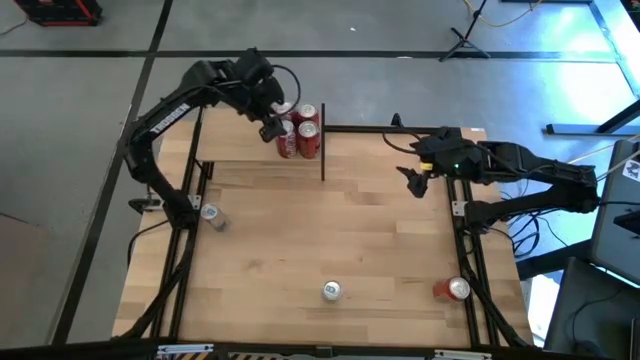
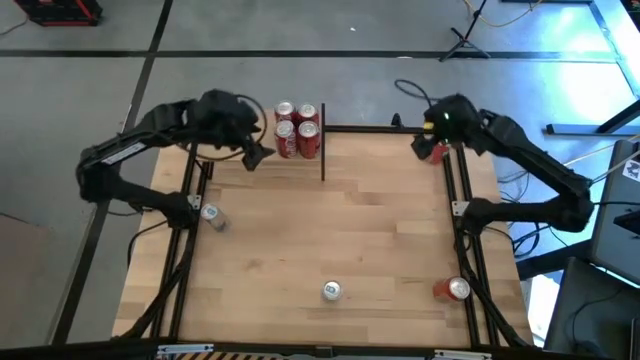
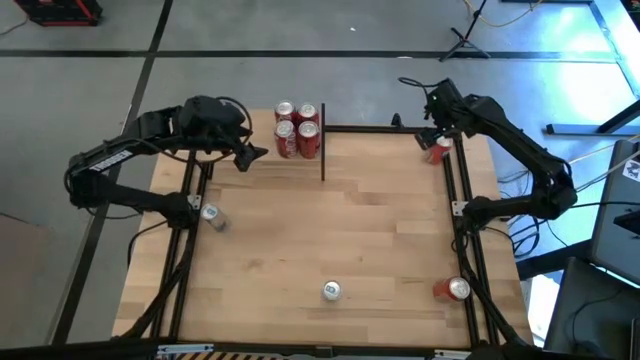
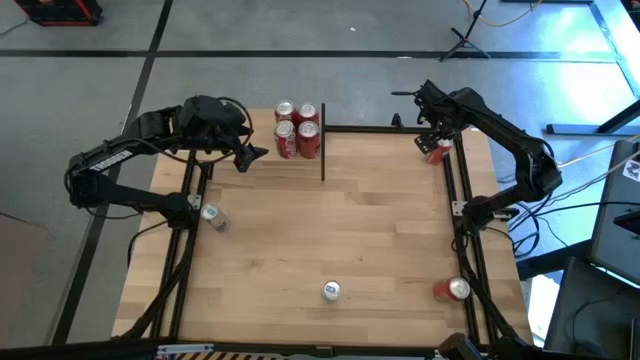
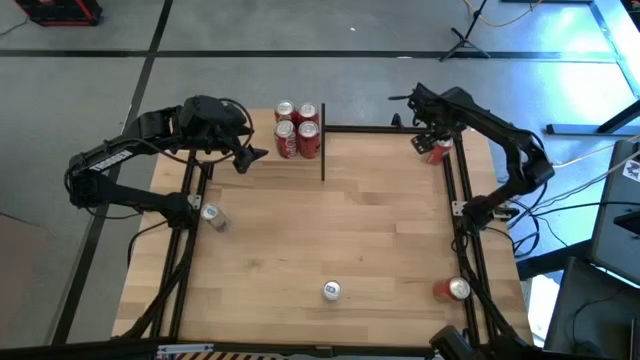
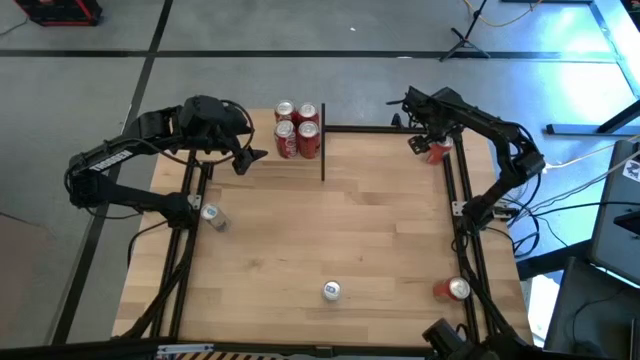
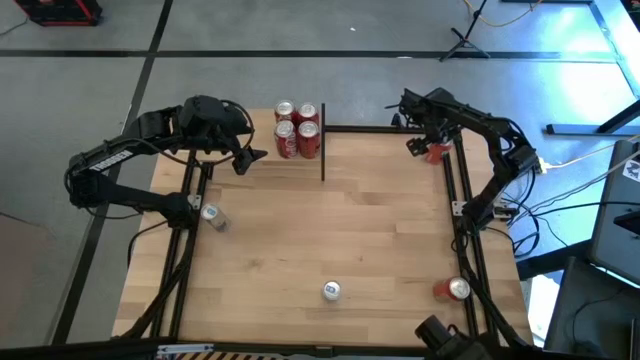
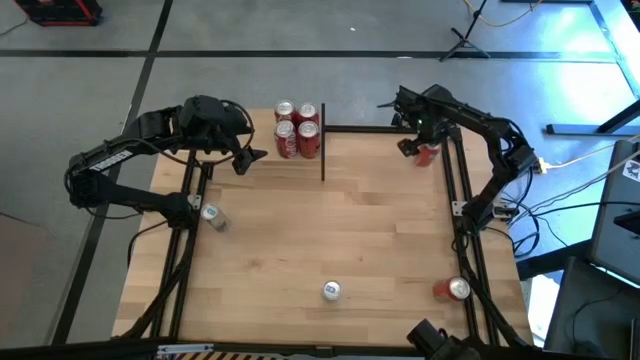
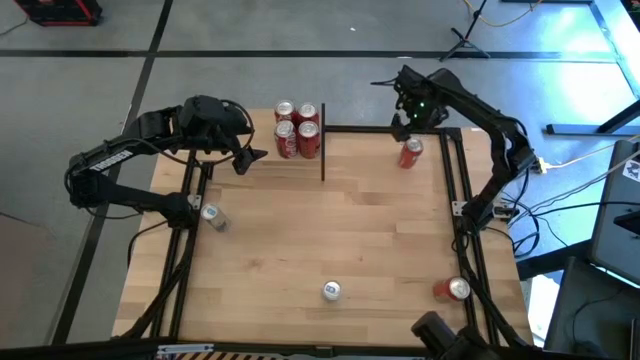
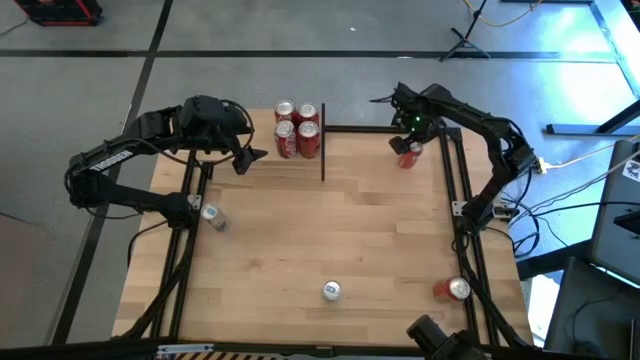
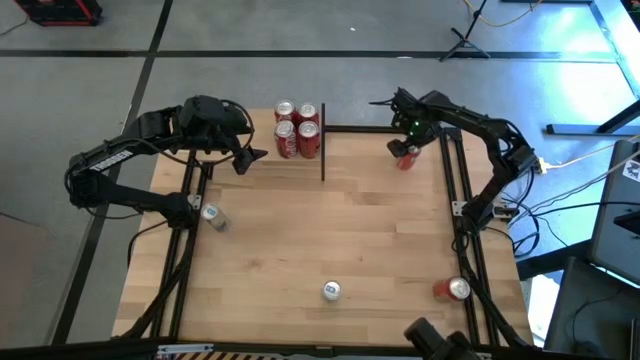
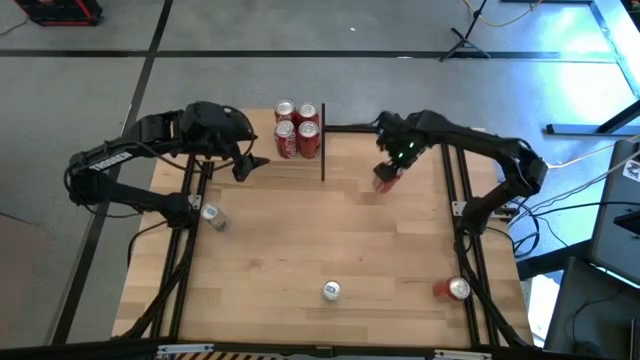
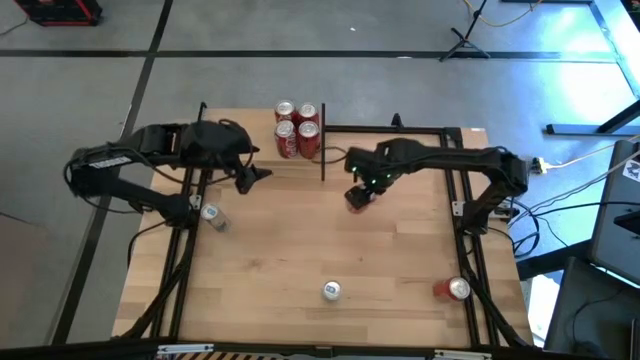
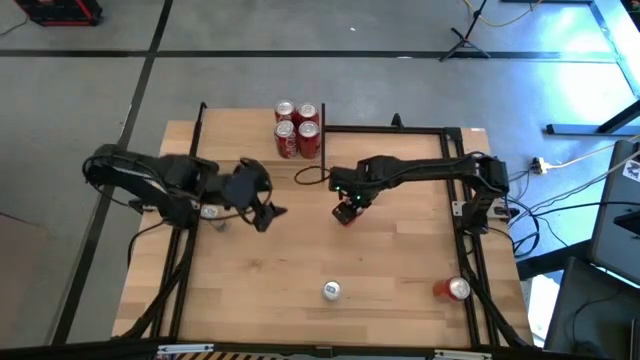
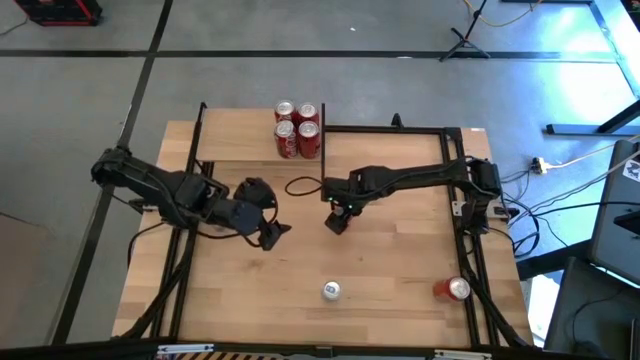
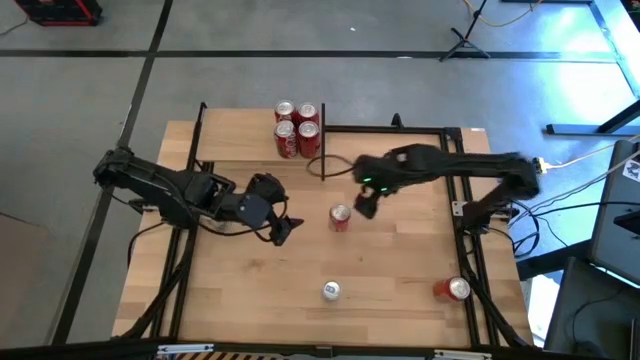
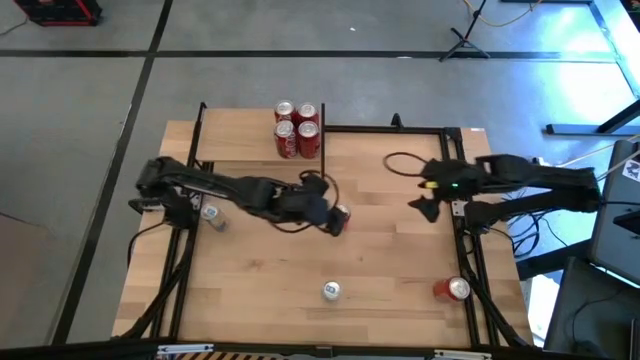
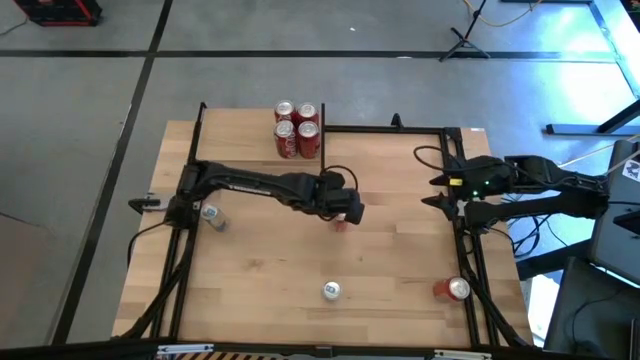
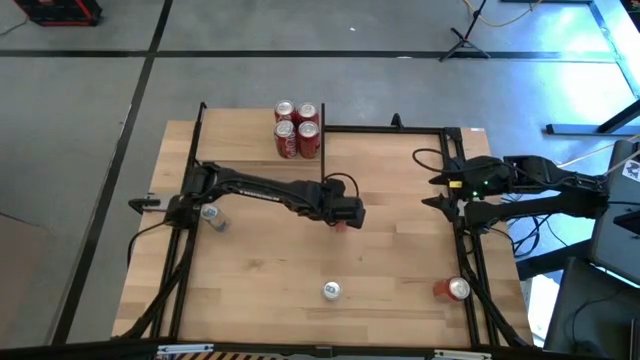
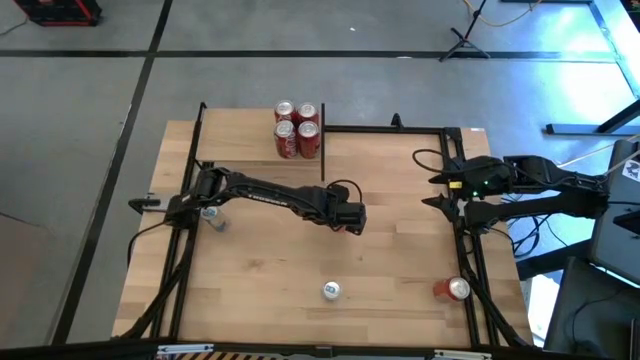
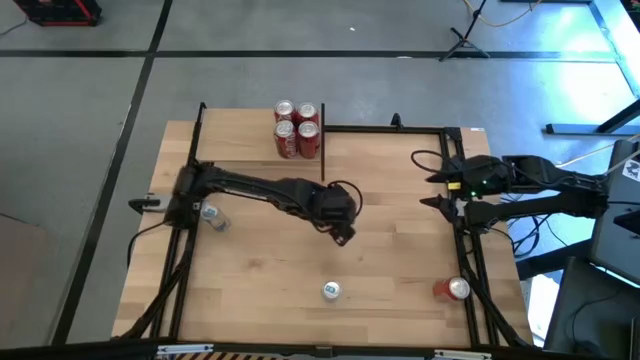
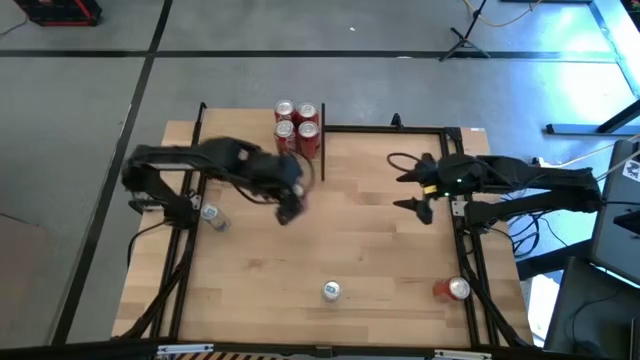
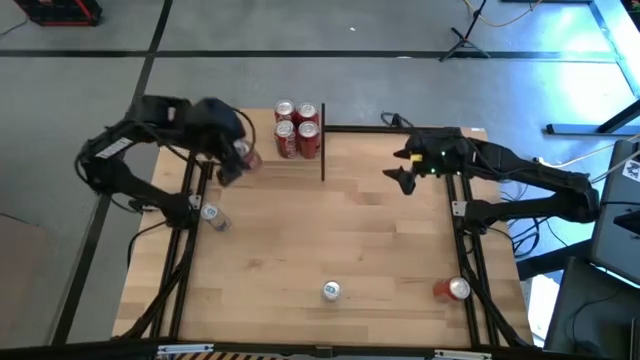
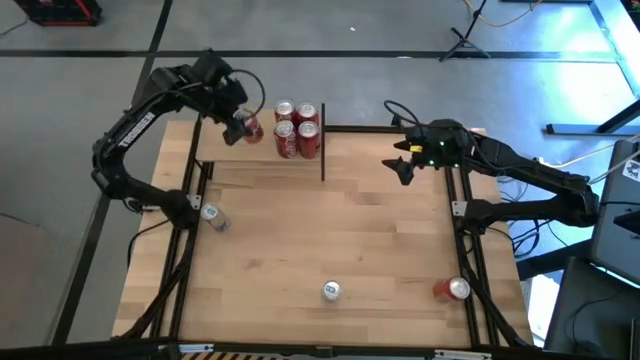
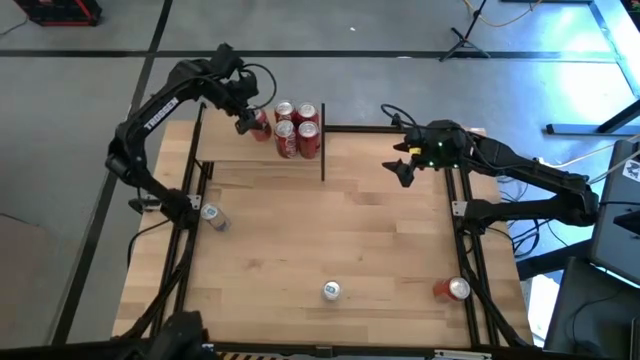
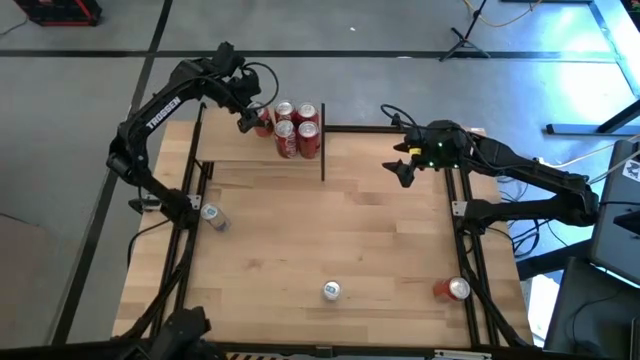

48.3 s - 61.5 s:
Task: Place canned beverage on shelf
Put the top red soda can on the shelf

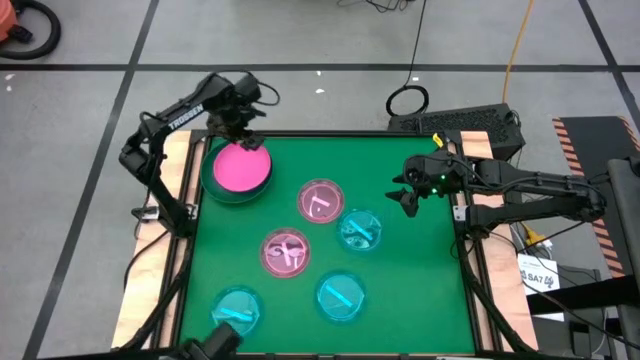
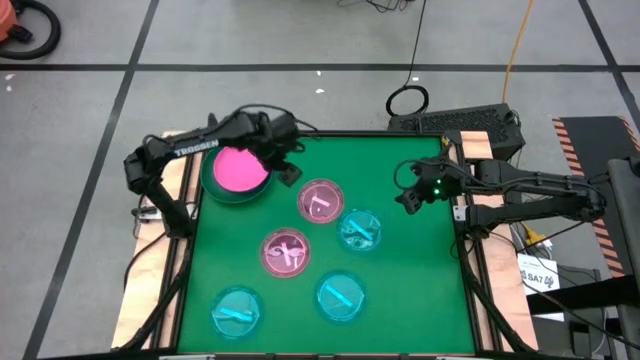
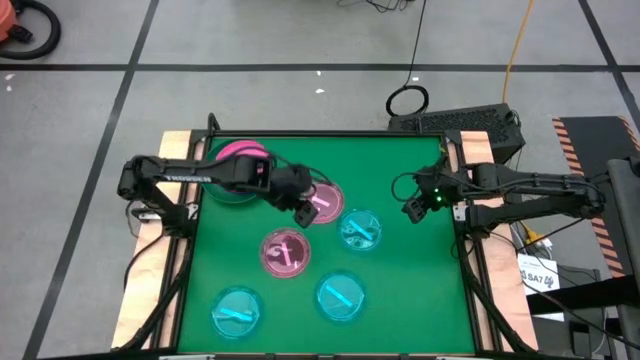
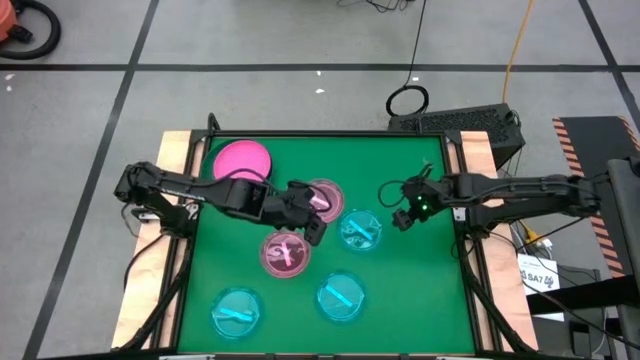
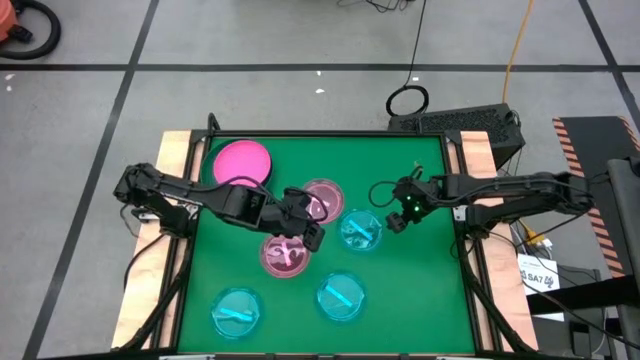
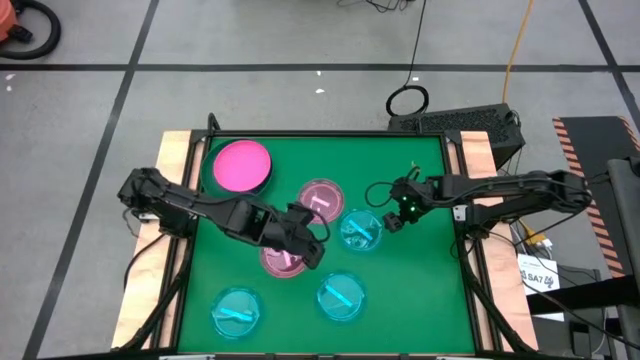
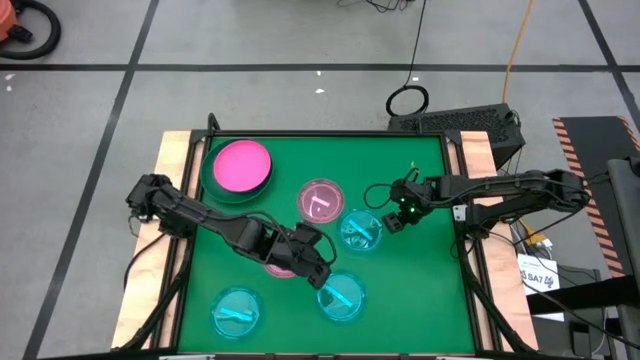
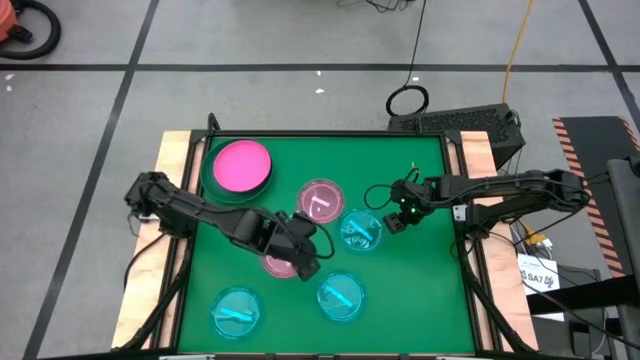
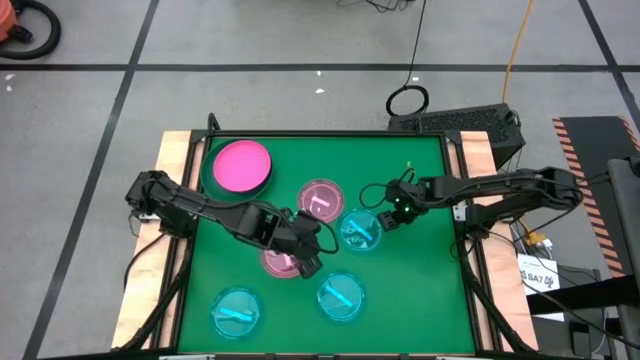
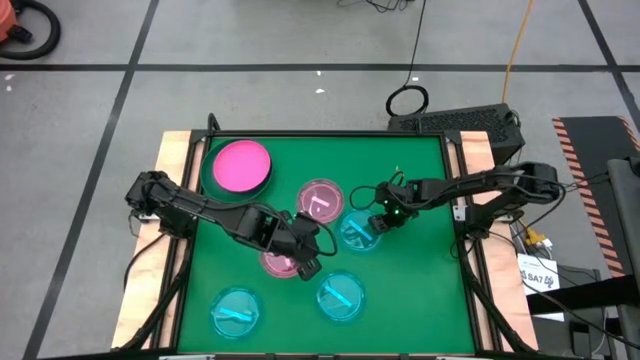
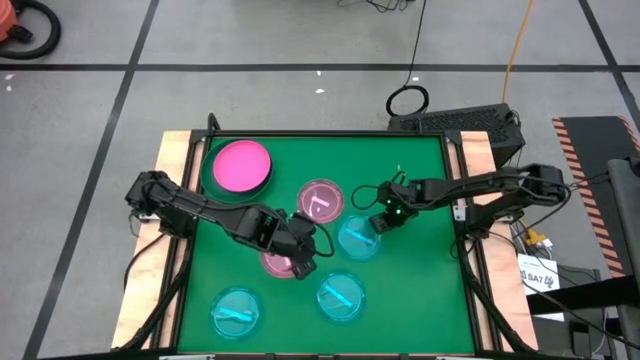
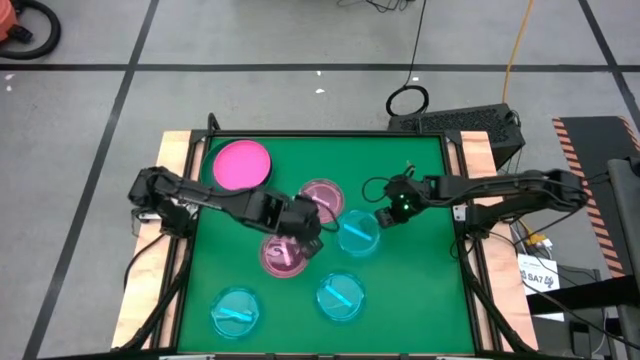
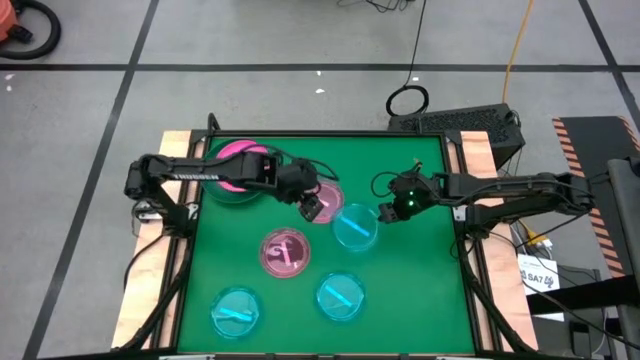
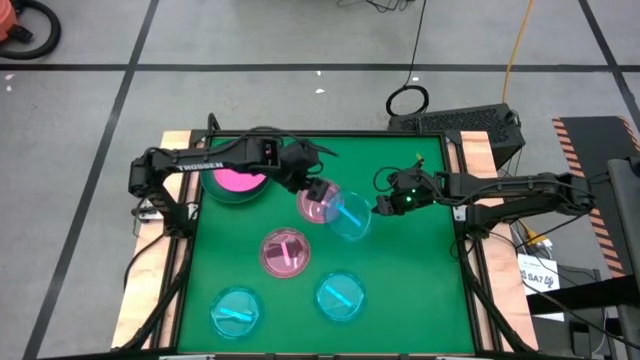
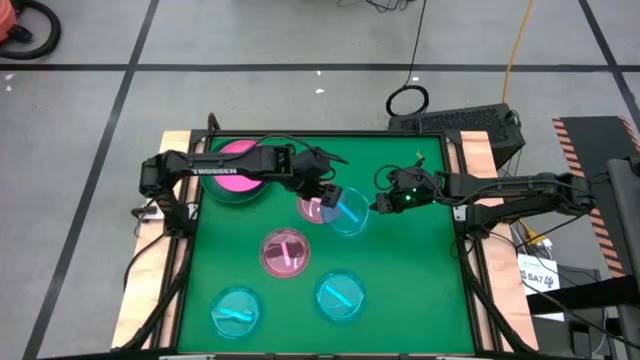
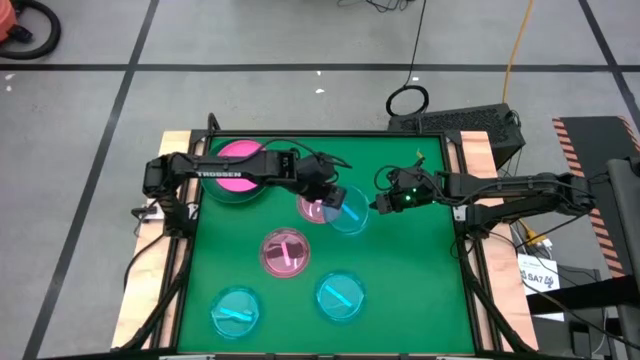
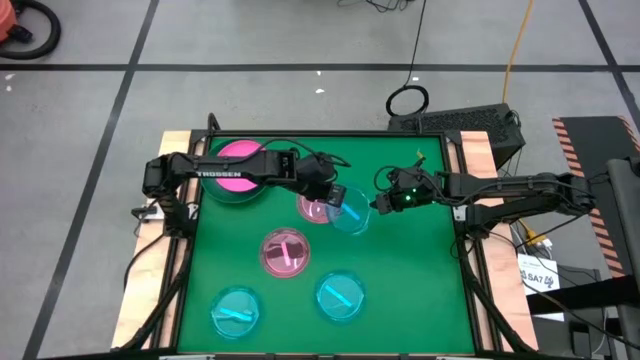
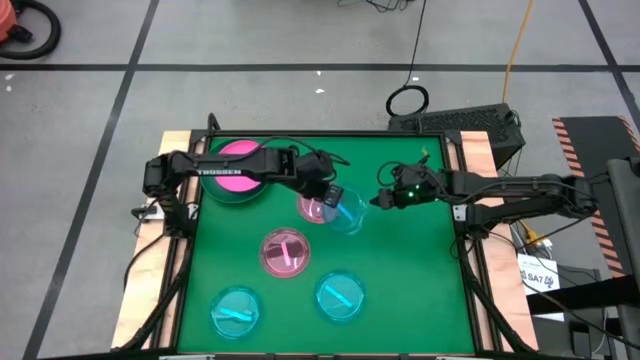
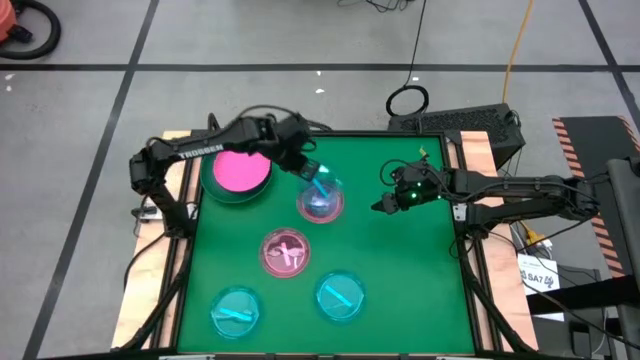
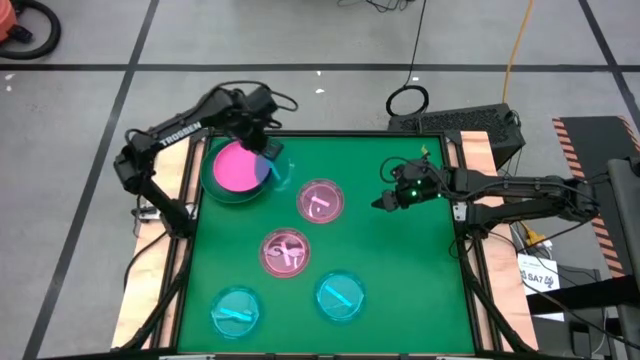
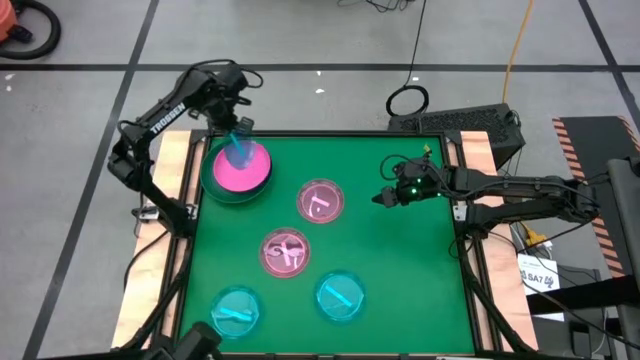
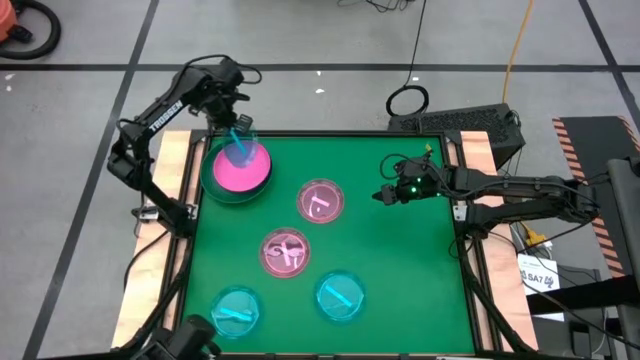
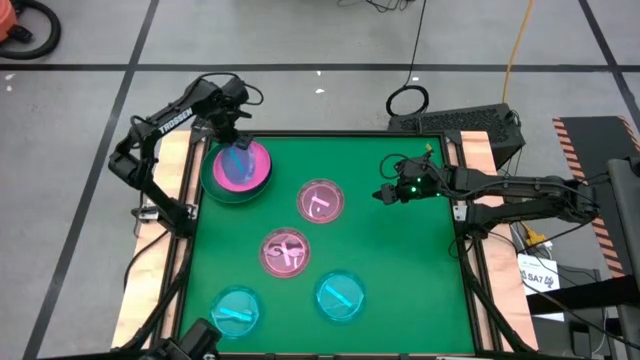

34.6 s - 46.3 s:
Task: Stack plastic plates
Stack the top blue plate on top of the pink plate
